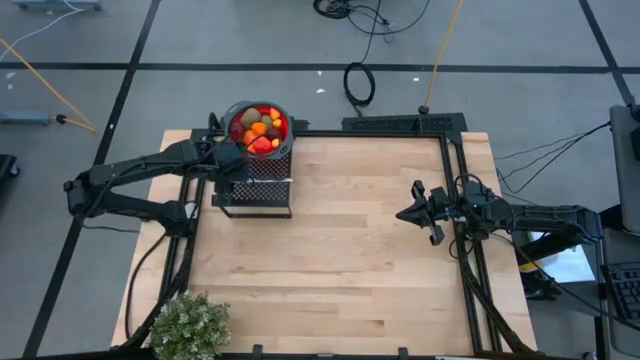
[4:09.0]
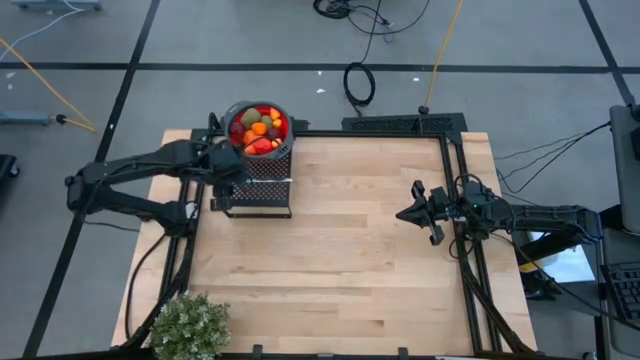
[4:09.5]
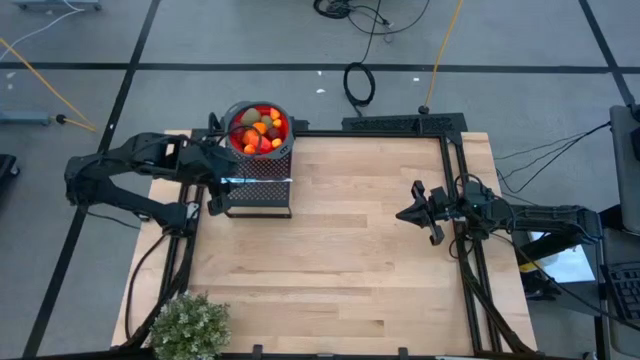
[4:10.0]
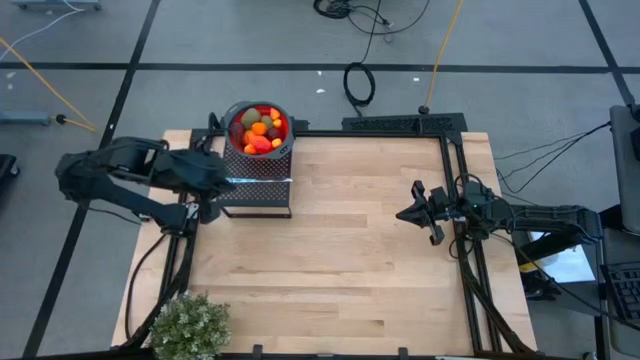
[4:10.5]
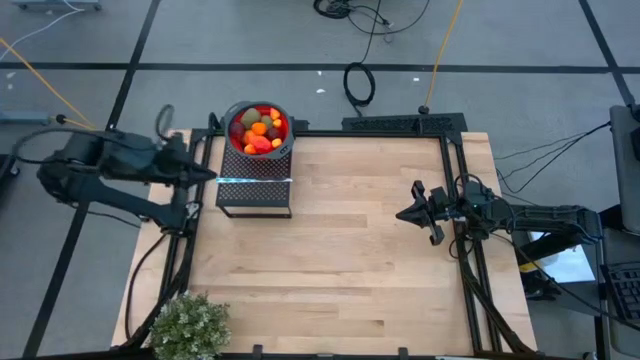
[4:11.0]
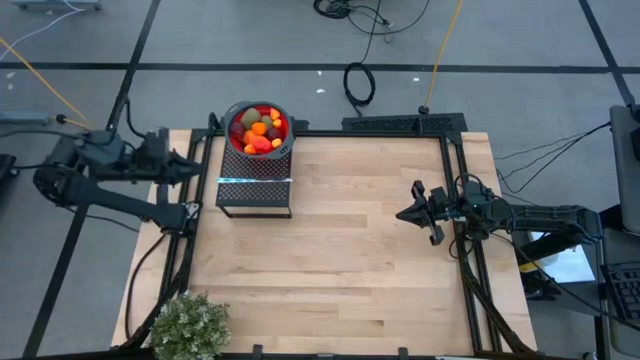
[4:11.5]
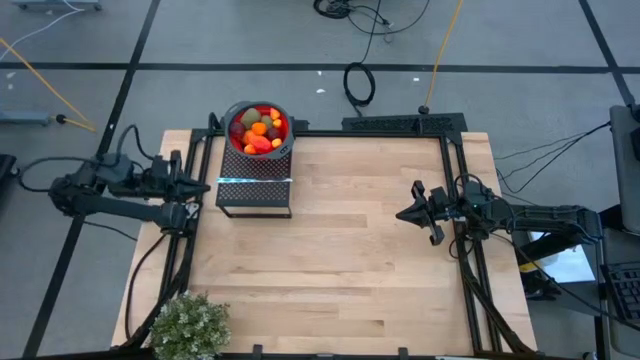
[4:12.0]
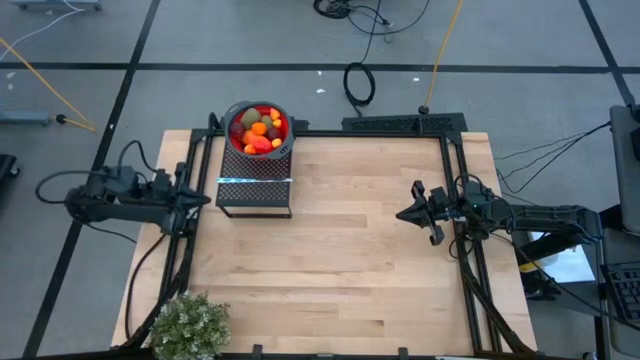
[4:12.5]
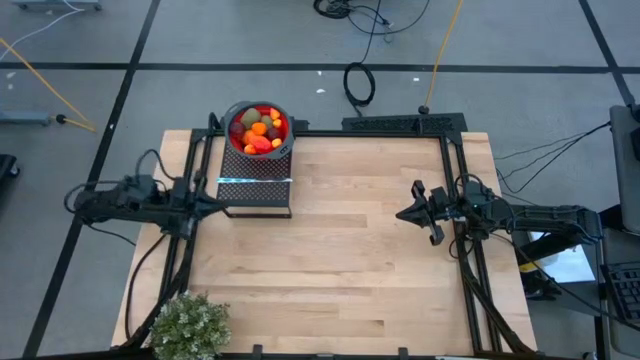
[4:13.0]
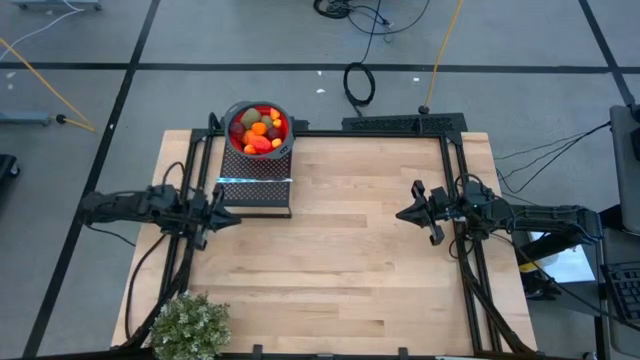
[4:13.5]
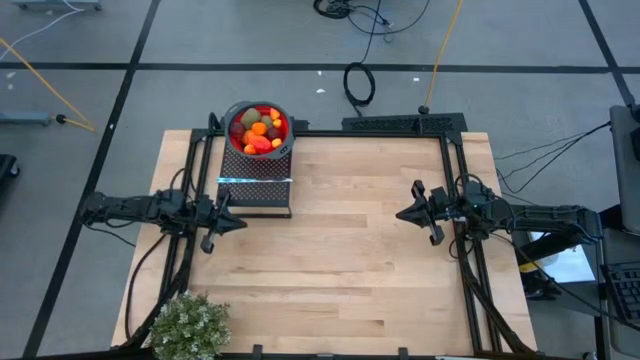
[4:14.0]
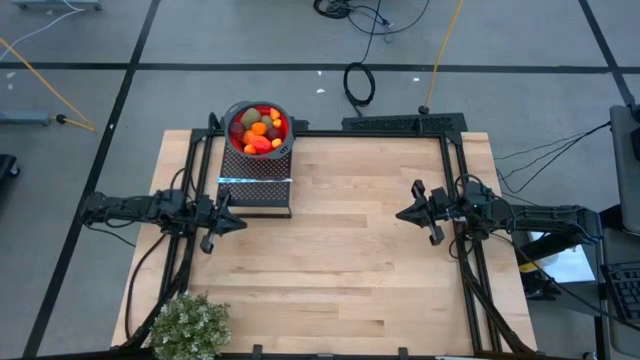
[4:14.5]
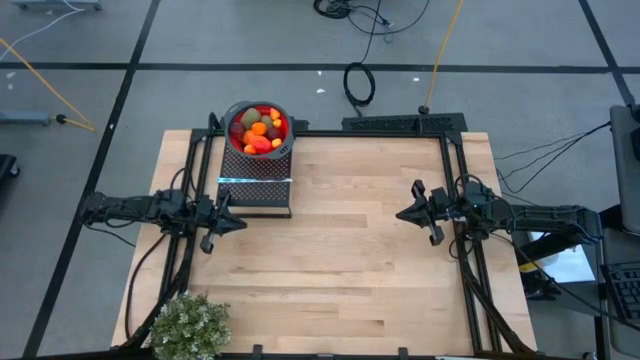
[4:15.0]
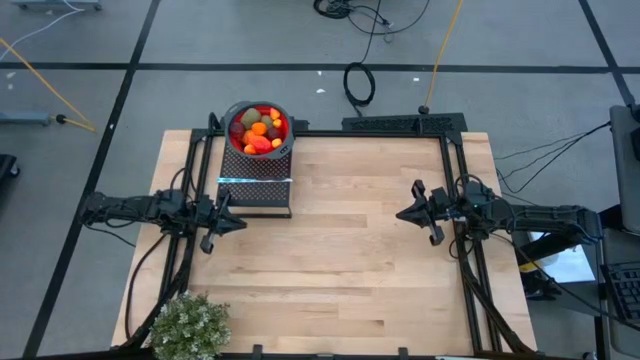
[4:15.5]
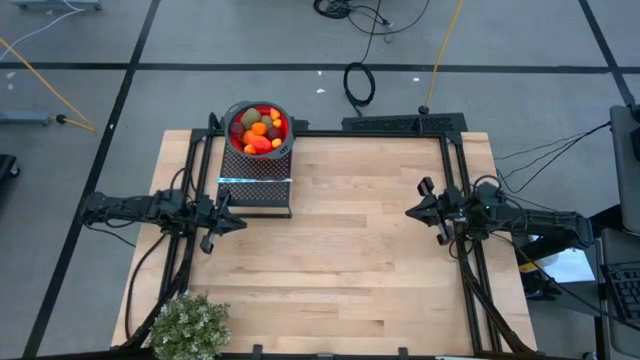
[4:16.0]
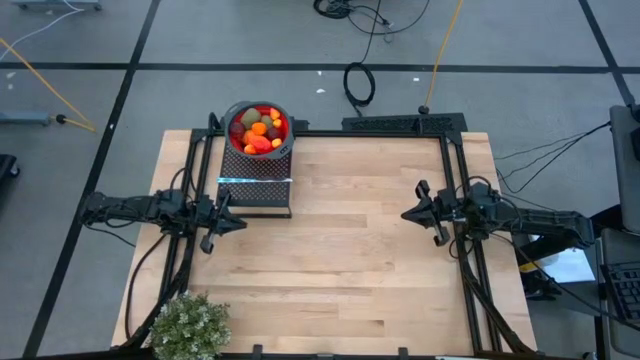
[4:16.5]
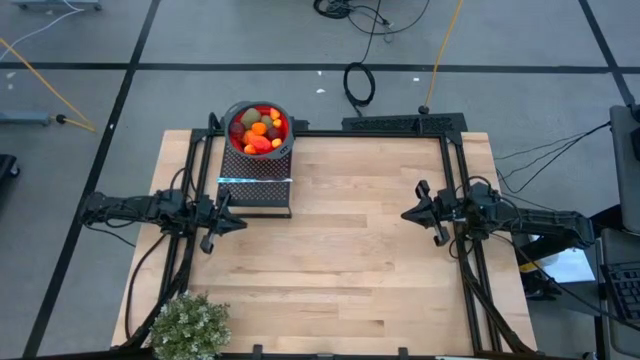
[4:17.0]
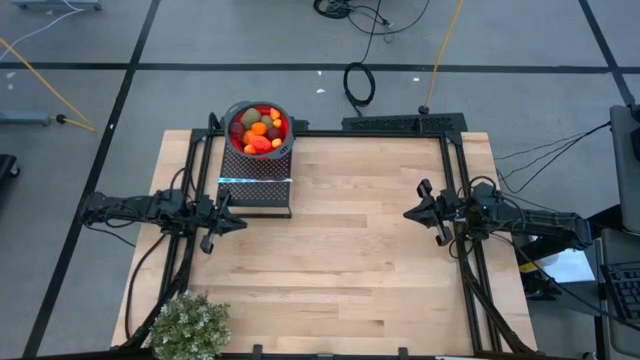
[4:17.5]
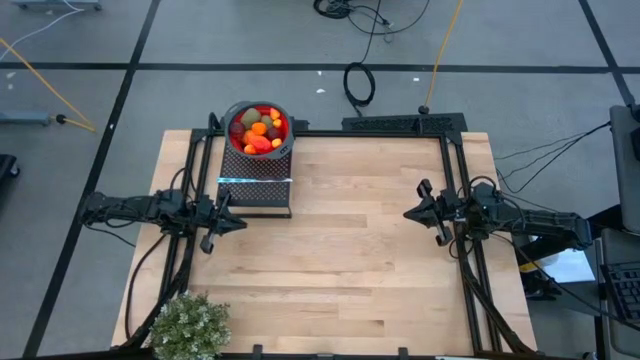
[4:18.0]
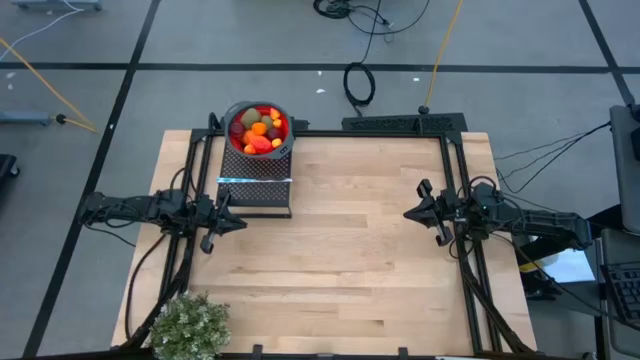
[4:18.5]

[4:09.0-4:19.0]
Task: Pick & Place Fruit
Return to Home Position

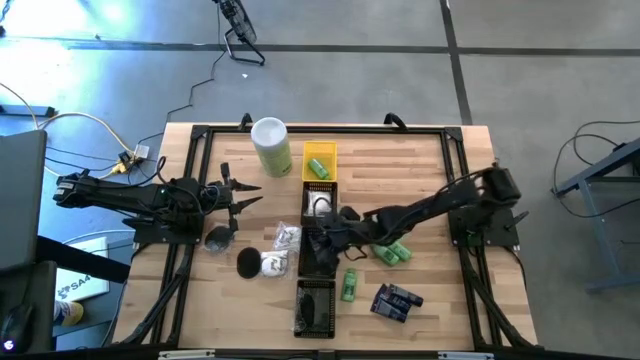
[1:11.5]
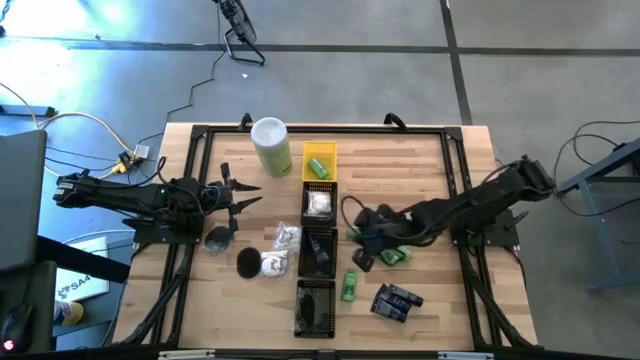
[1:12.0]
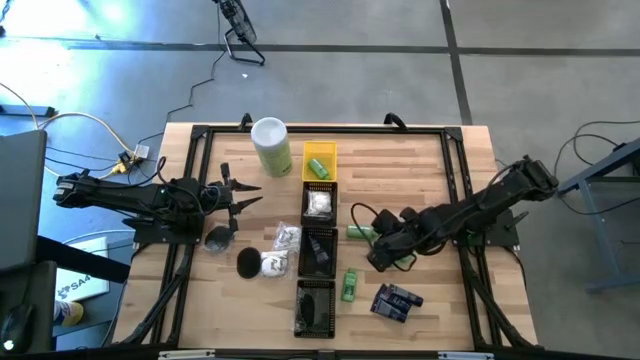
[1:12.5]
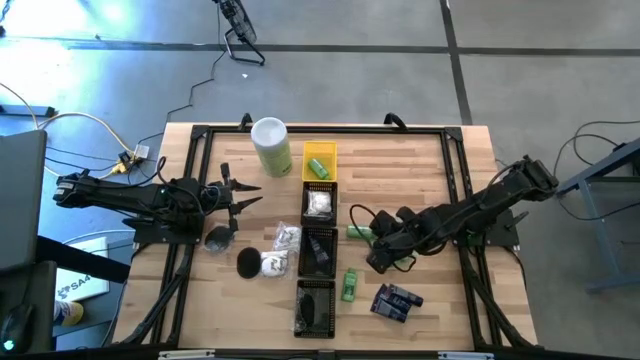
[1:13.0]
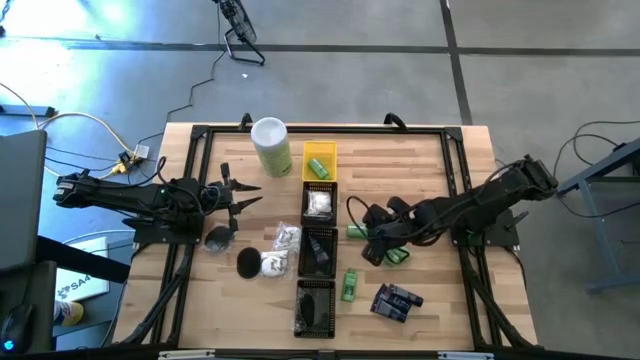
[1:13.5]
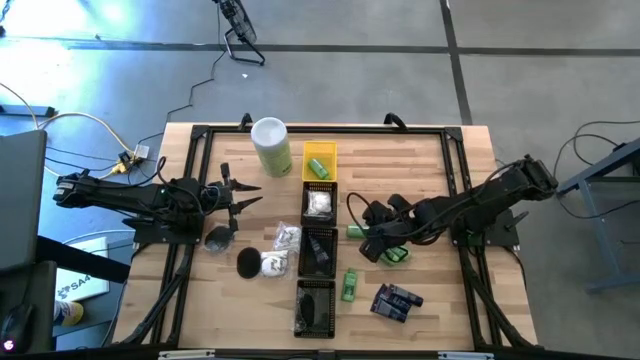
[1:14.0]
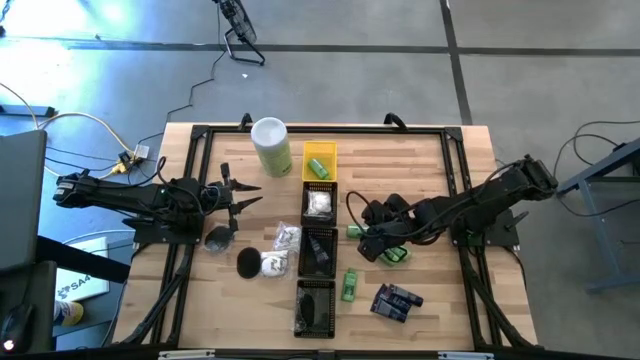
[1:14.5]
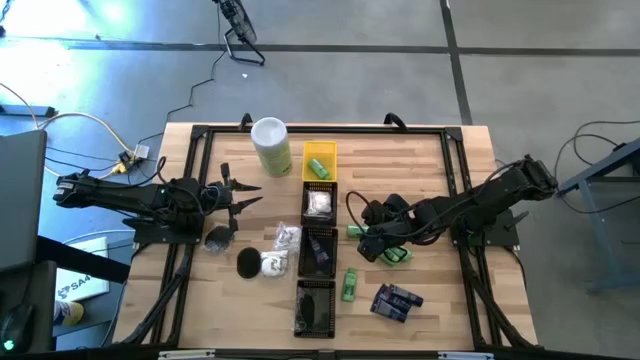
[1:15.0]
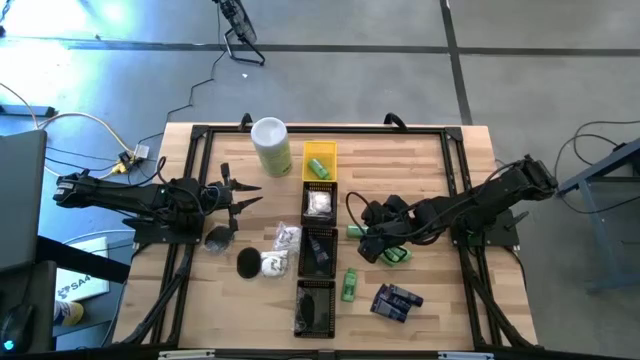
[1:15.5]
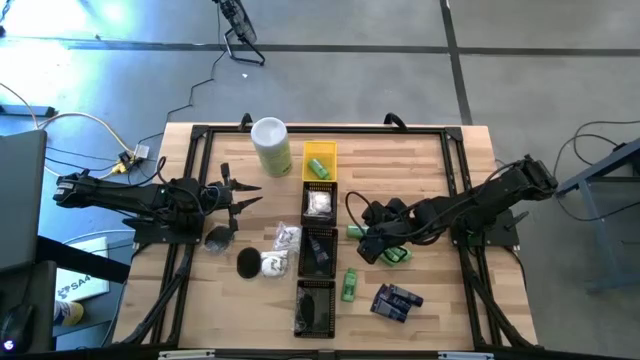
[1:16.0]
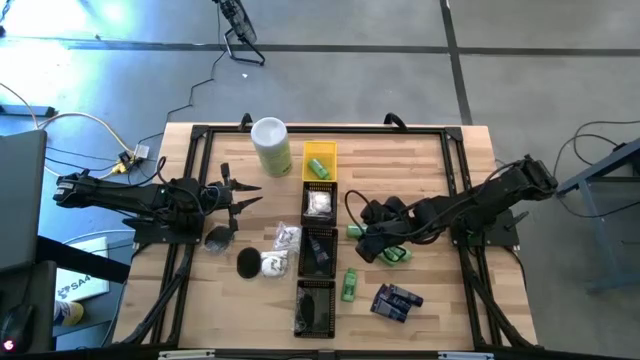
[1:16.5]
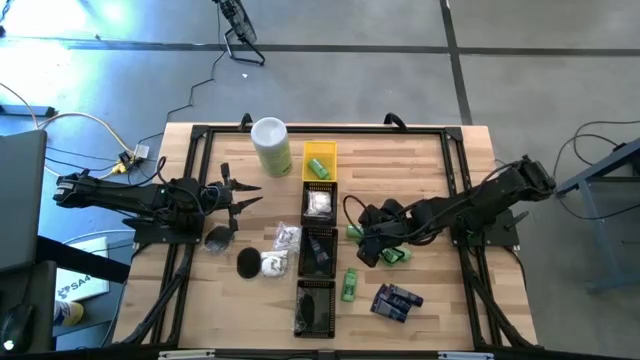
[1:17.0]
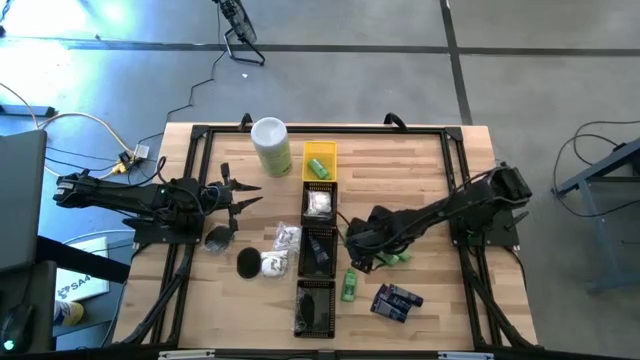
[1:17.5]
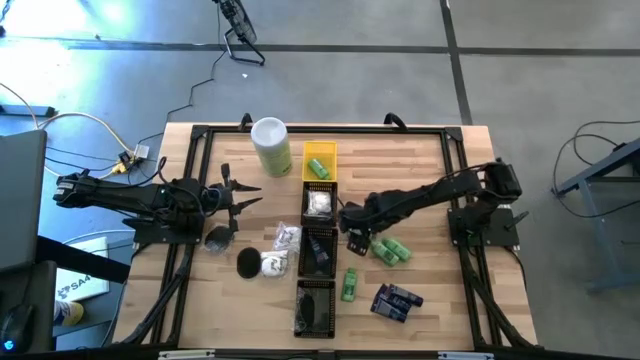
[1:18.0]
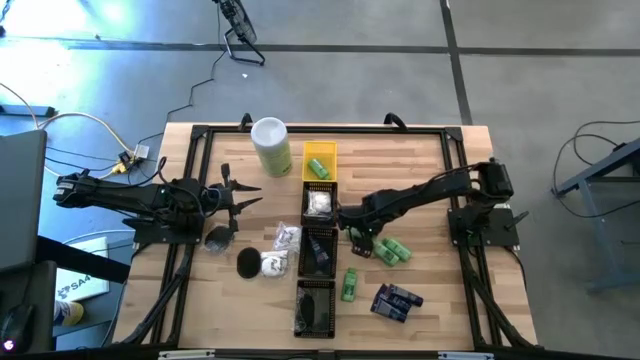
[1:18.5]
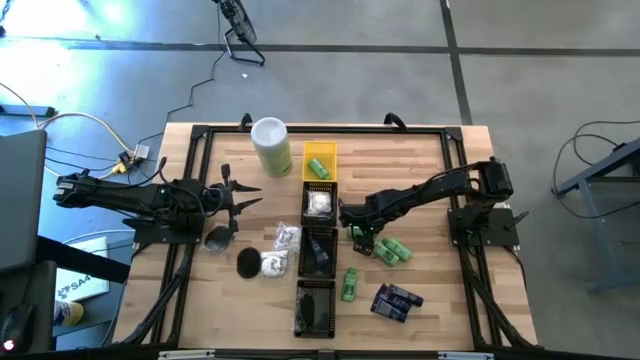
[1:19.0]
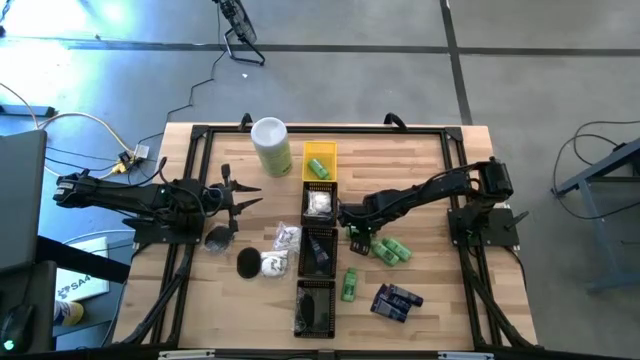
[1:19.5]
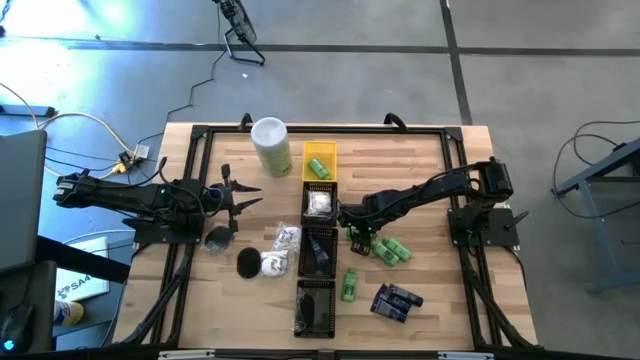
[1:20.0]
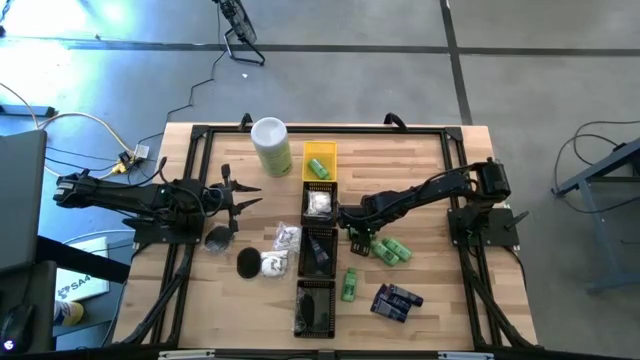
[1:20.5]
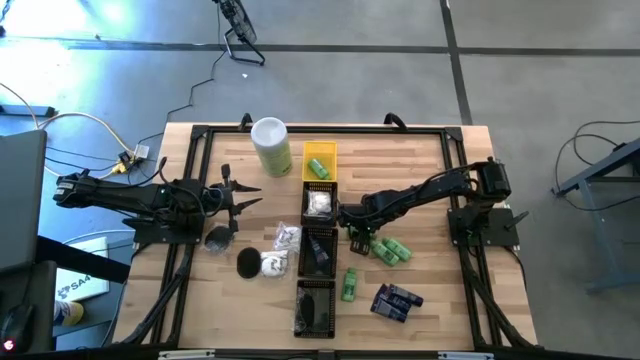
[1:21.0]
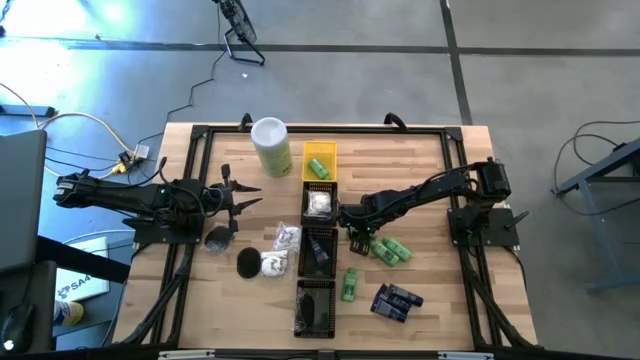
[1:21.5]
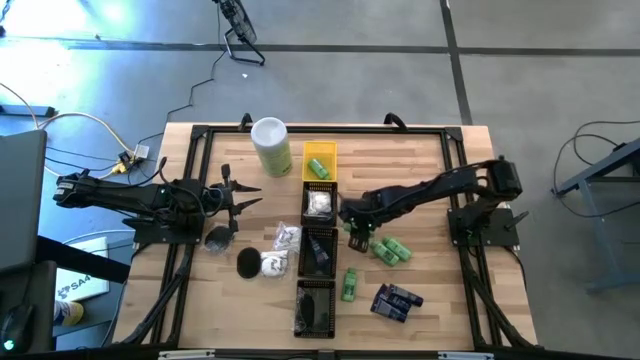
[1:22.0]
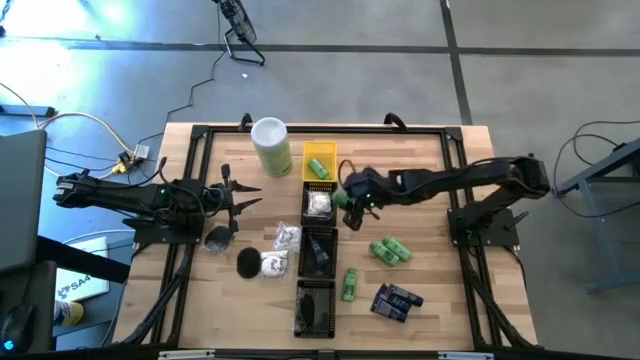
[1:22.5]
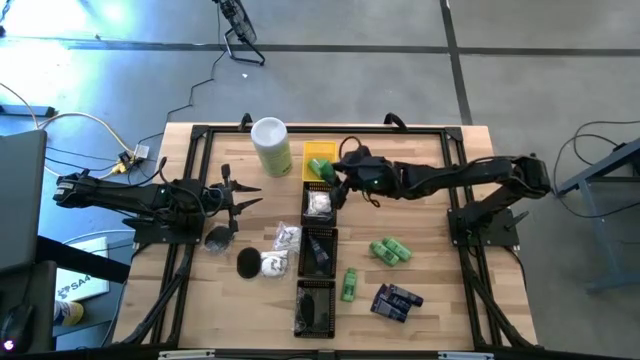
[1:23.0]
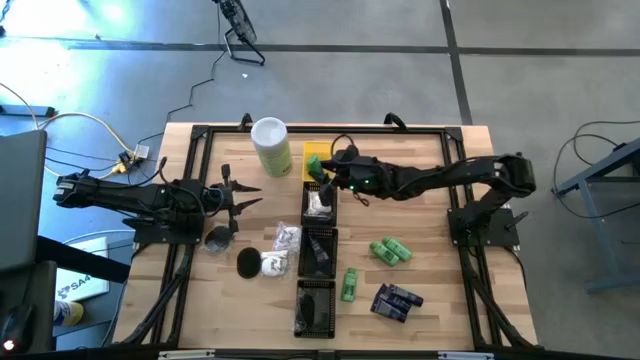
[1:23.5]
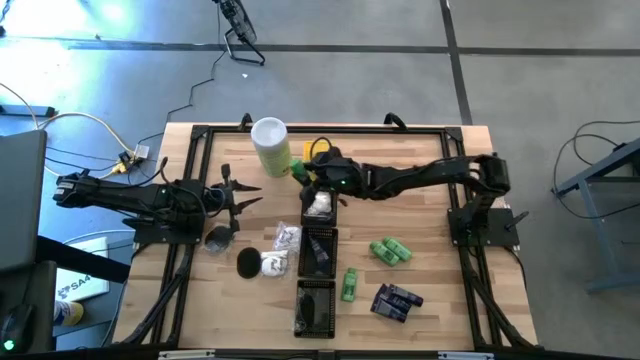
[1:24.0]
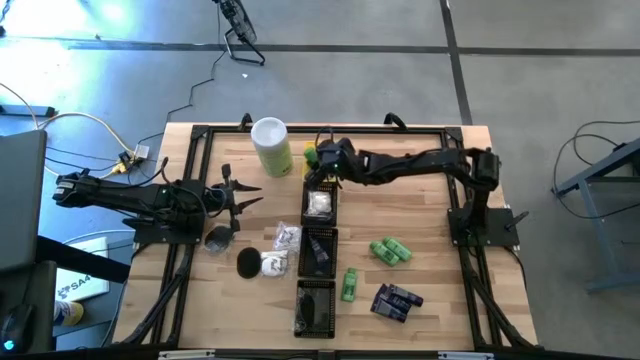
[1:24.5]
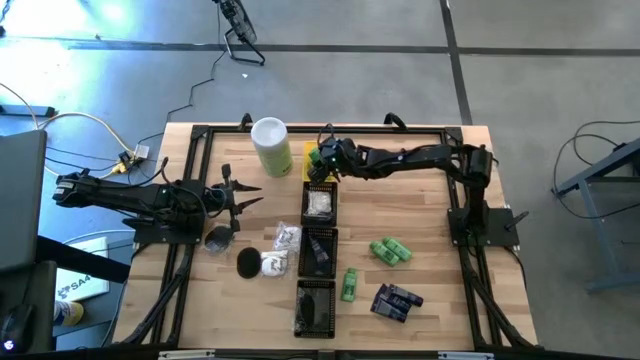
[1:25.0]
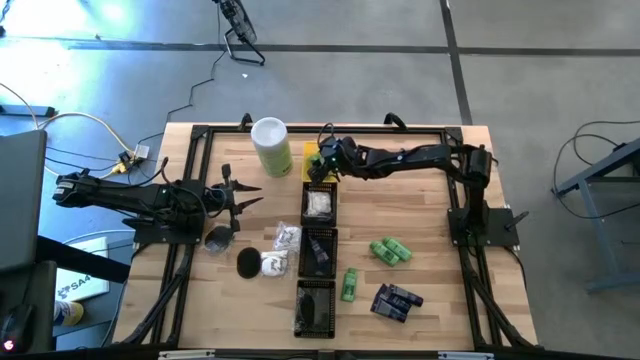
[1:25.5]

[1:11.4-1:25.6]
Task: Pick & Place Travel size toiletries
Put the green bottle into the yellow basket
